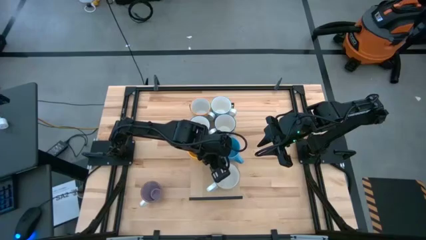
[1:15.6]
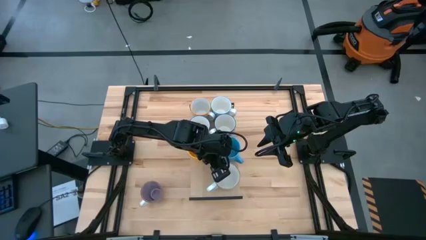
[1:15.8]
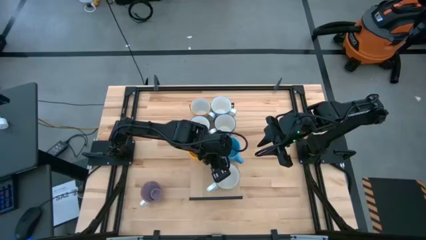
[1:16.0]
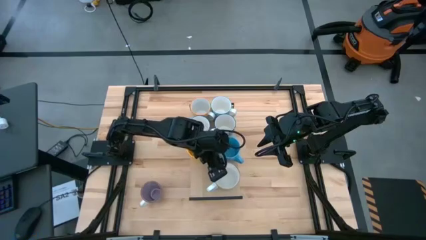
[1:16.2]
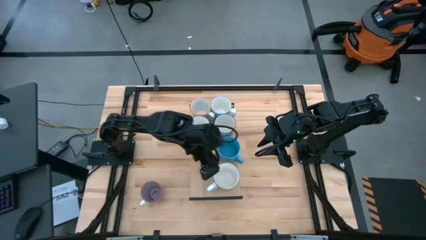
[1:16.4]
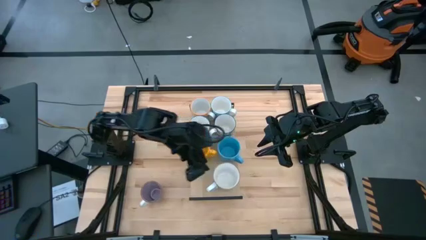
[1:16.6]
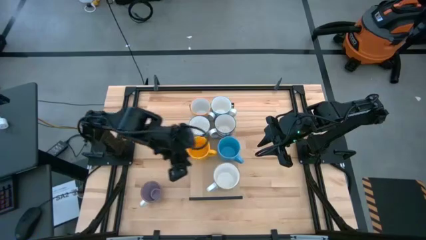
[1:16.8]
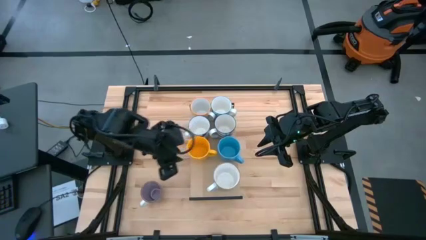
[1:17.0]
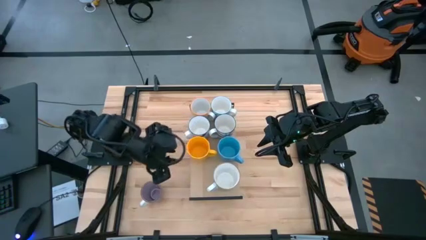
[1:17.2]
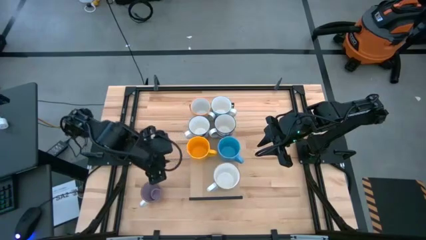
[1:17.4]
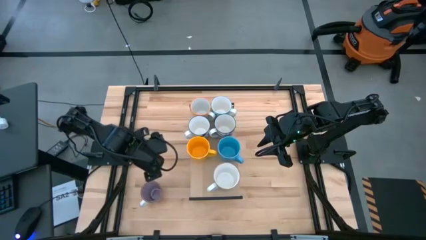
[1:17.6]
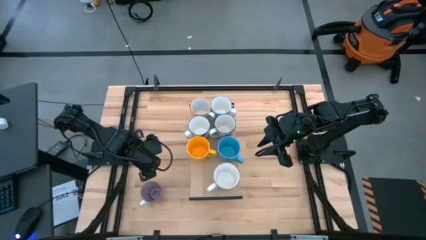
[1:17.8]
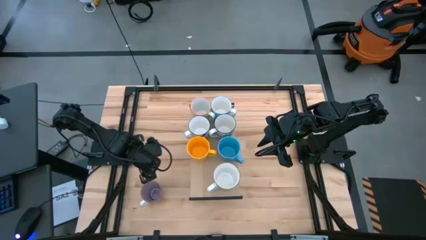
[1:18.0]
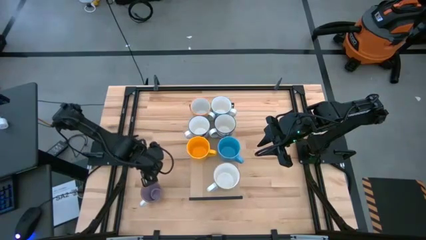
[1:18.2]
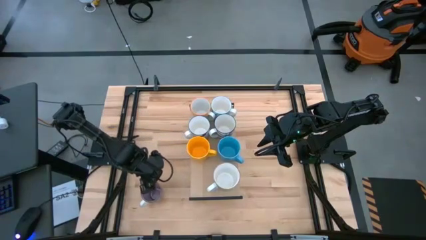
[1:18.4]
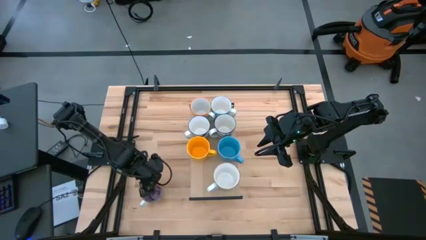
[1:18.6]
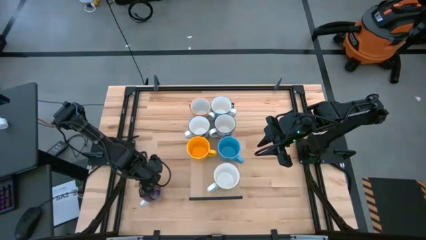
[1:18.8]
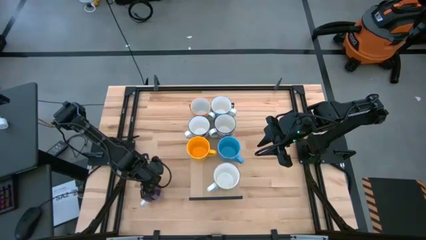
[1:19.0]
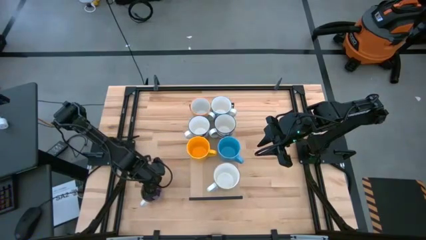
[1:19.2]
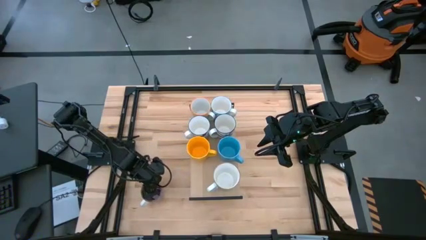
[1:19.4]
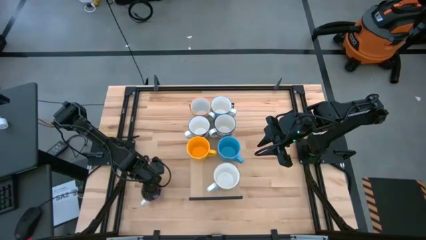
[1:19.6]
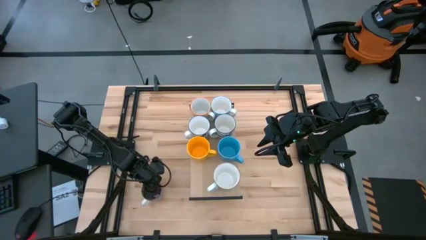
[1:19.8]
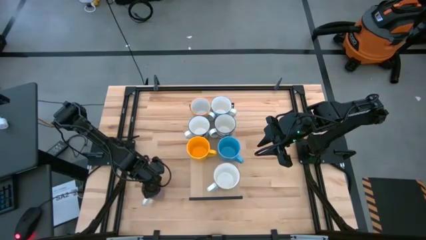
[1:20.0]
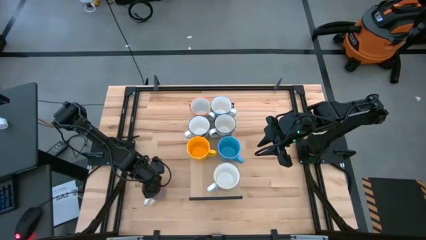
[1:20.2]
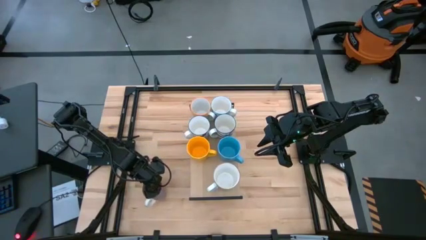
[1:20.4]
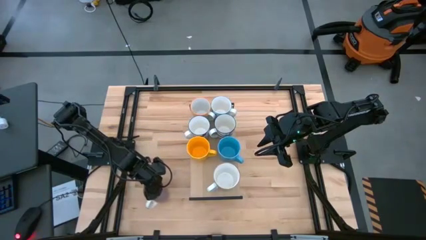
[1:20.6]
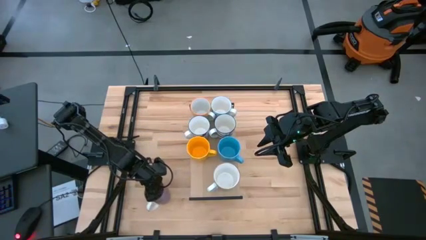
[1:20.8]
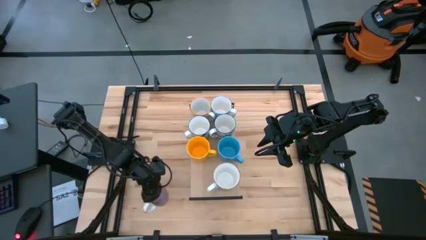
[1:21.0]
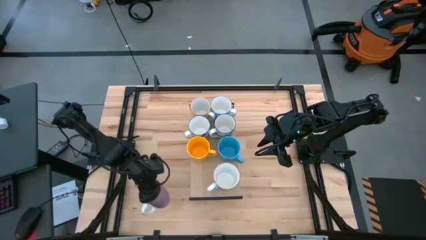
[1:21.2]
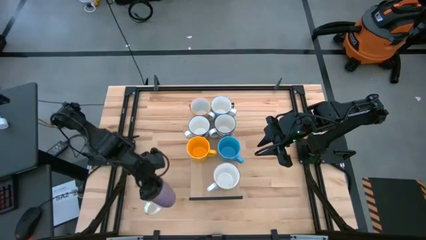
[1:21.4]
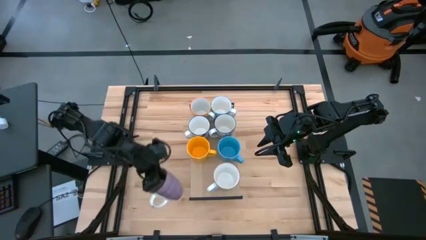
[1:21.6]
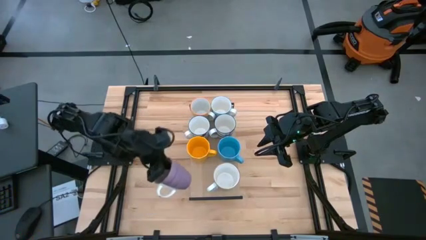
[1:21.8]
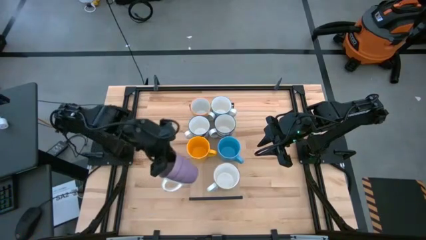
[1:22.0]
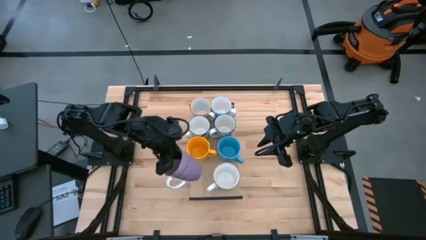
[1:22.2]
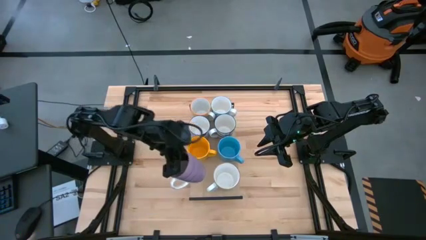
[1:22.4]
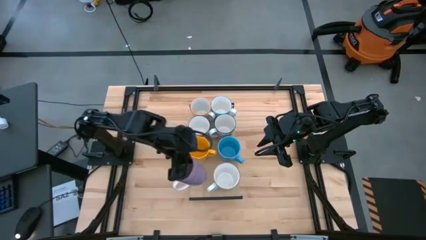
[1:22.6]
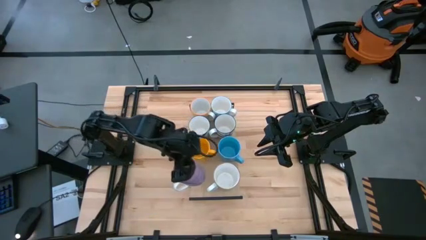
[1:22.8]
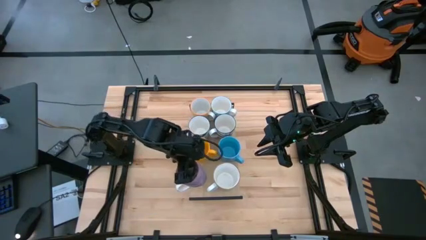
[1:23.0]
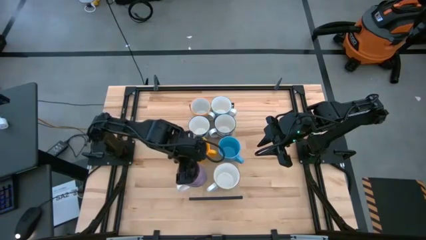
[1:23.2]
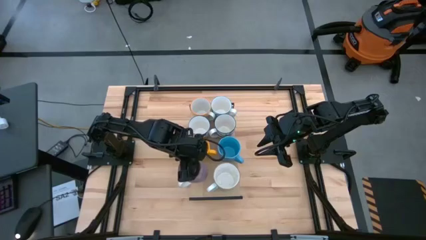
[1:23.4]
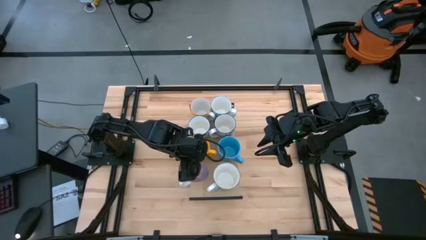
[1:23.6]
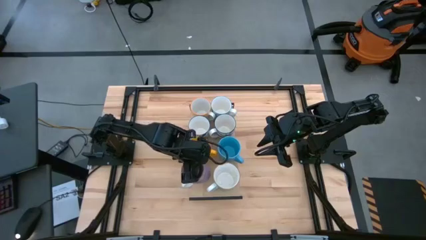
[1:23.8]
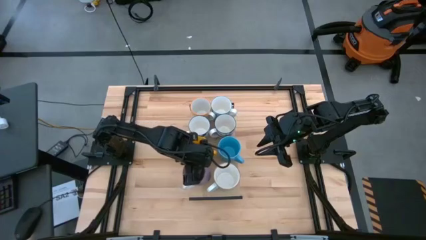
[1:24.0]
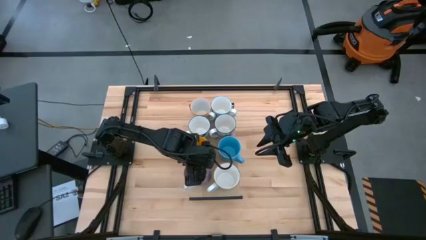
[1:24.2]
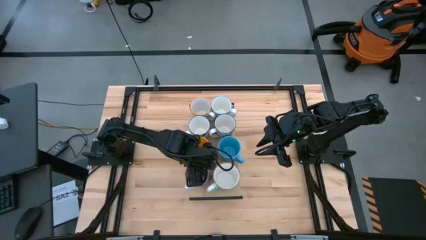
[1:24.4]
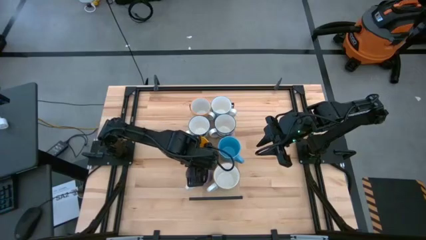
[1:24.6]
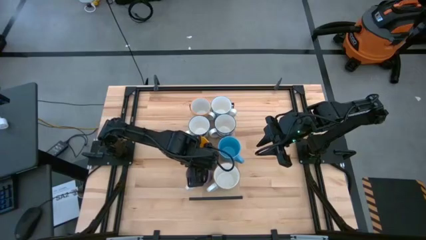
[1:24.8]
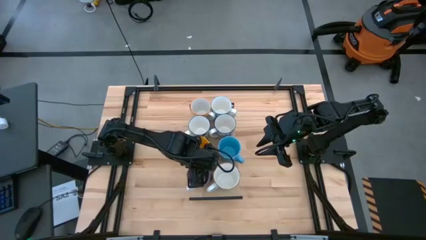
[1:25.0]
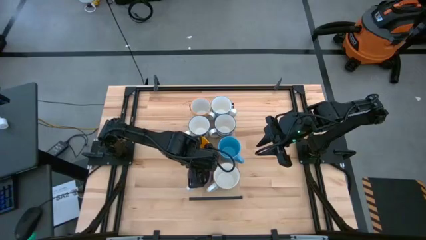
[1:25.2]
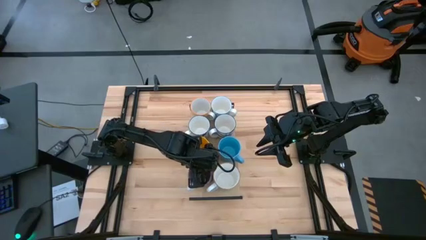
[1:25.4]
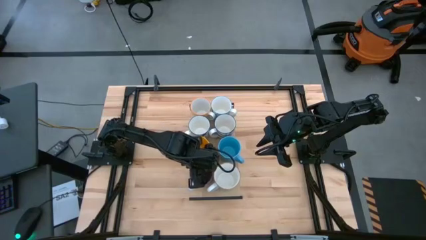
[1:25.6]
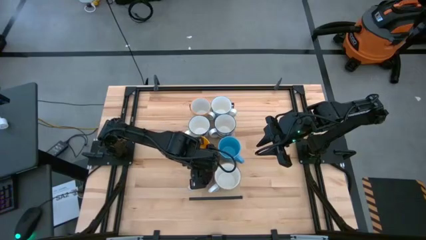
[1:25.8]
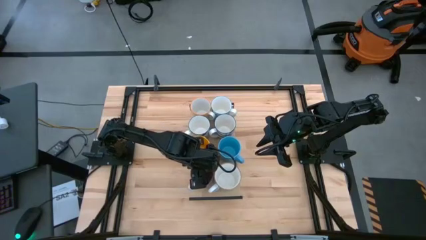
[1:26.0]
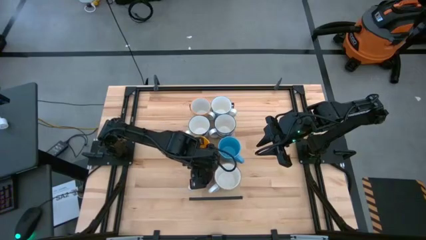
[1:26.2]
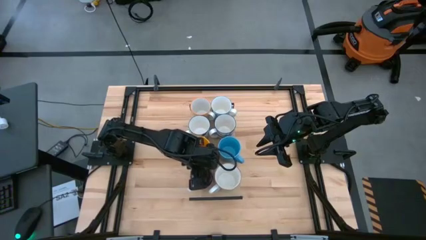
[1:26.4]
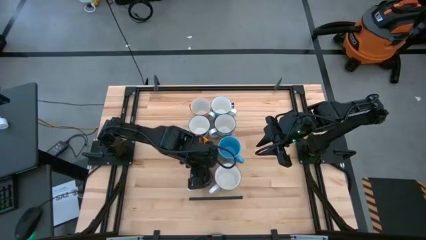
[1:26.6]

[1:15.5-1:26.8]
Task: Place coffee mugs
Put the purple mug on the shelf

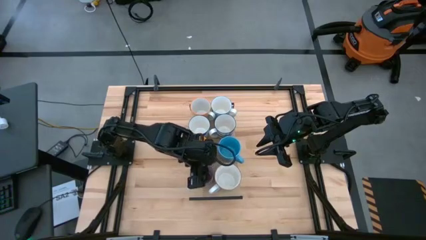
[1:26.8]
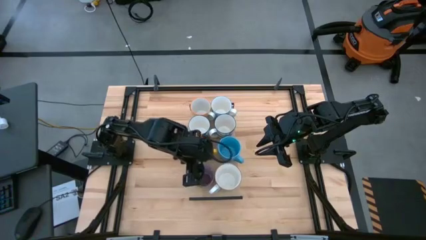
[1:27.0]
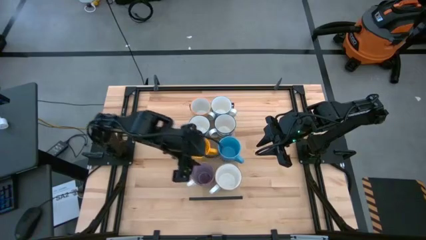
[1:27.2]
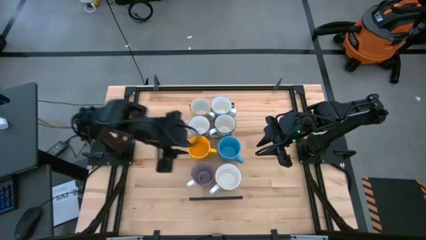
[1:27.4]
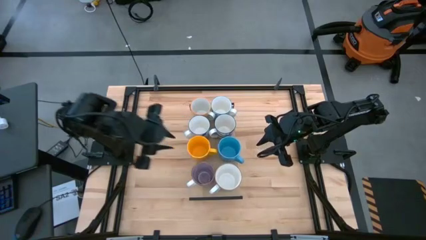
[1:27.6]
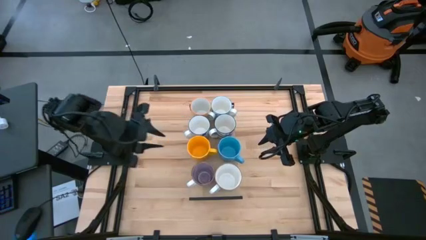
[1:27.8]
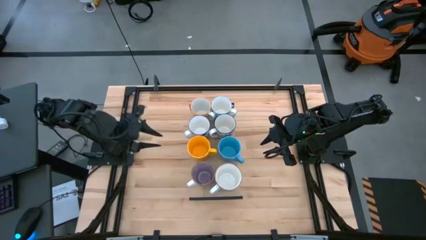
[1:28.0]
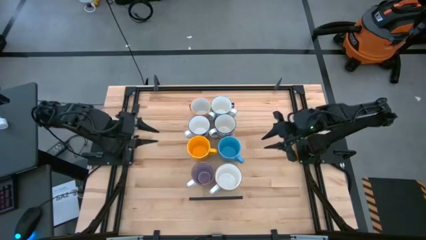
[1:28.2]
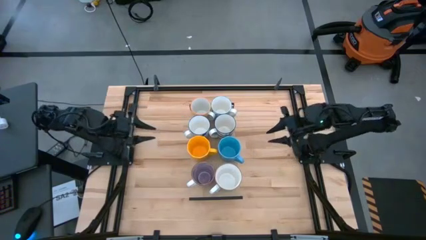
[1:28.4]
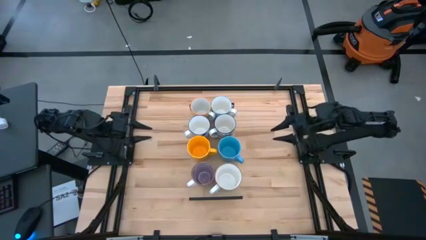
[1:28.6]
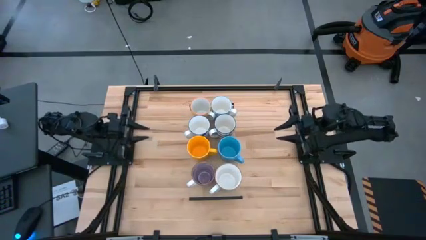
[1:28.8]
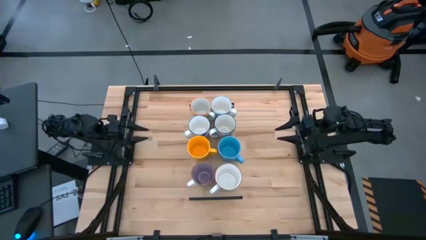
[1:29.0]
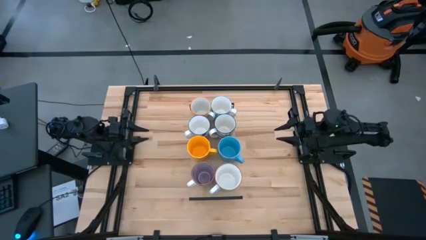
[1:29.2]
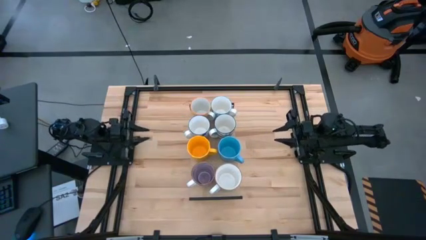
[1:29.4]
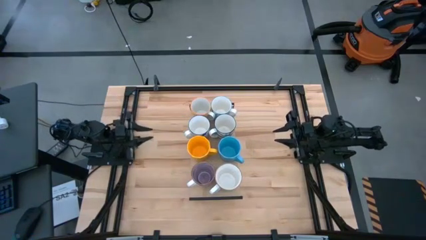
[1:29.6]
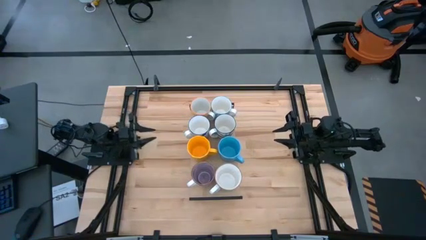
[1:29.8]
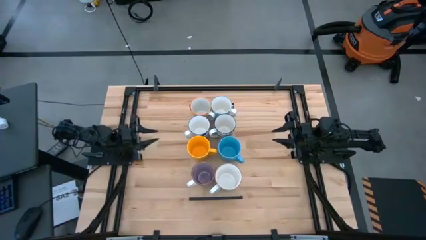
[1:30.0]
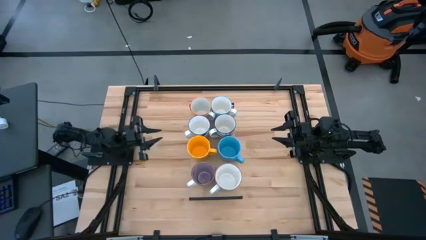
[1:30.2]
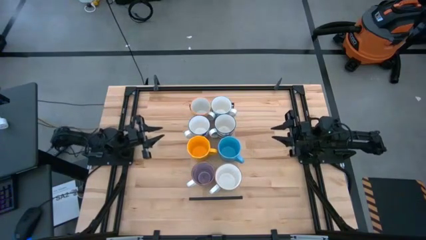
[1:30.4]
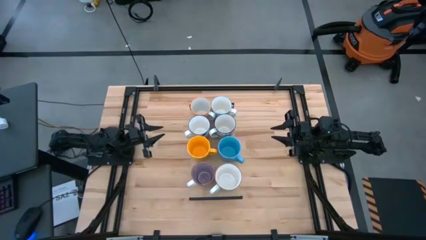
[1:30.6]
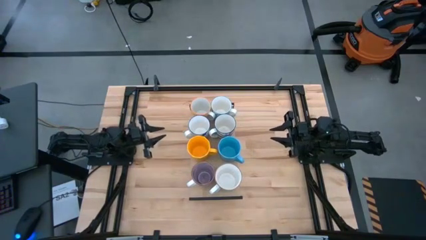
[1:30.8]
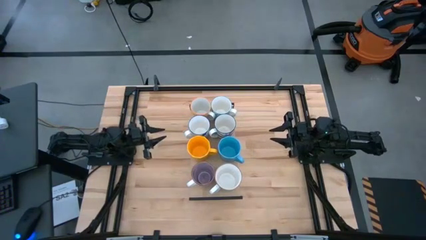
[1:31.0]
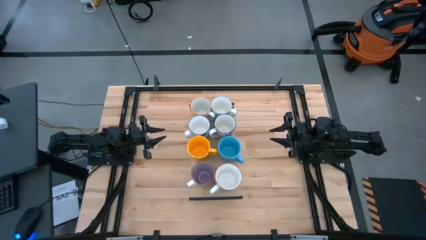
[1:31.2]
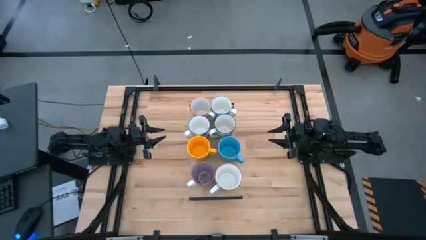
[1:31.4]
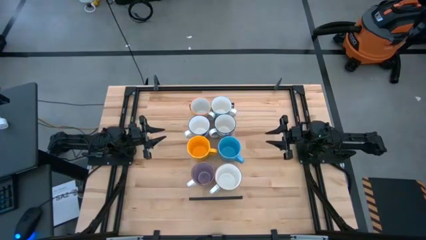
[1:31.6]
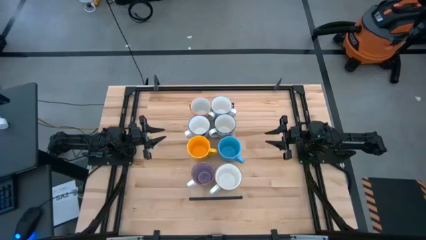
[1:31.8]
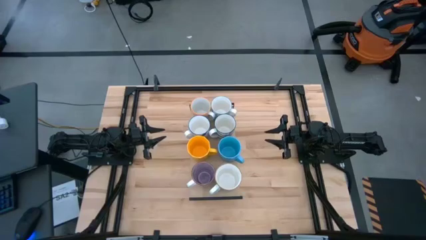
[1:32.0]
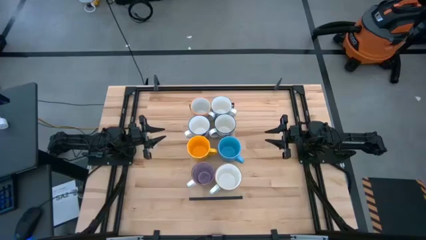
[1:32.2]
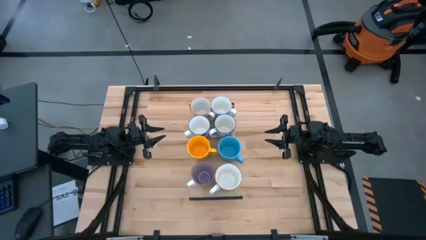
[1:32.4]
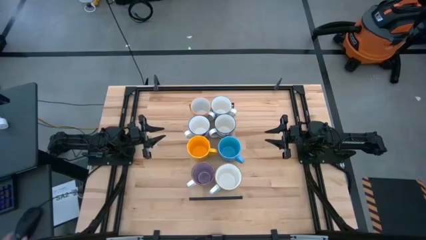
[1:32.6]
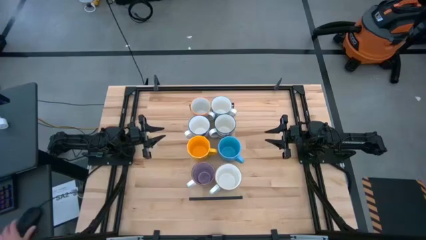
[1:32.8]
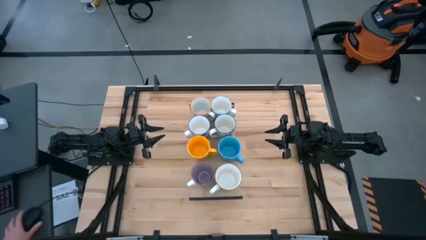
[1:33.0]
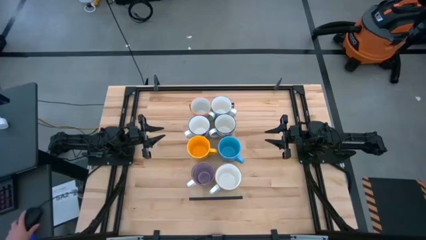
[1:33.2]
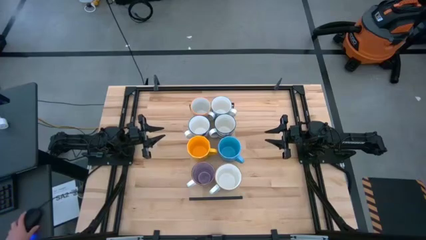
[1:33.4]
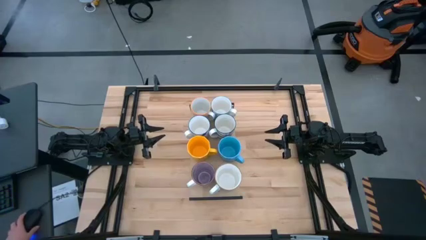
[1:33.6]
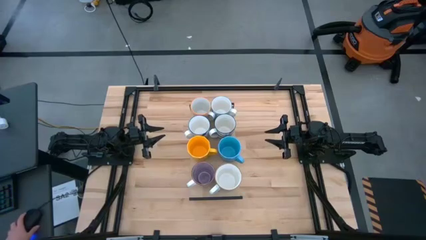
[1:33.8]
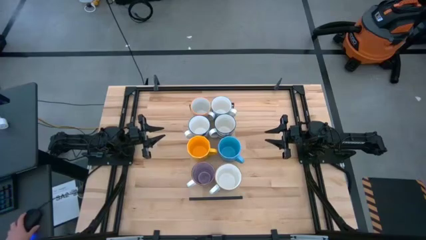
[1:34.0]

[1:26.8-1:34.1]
Return to Home Position
